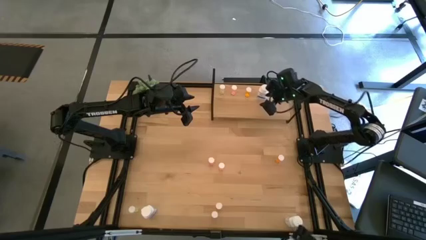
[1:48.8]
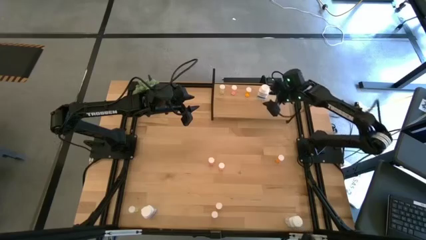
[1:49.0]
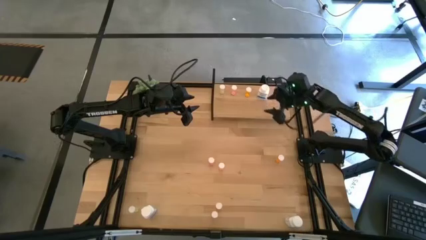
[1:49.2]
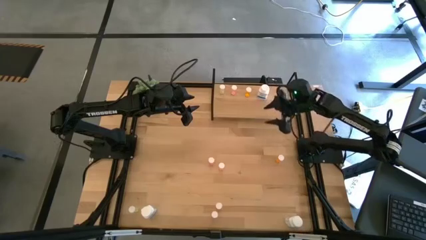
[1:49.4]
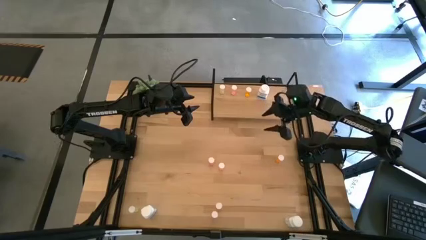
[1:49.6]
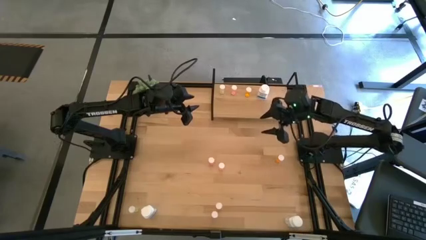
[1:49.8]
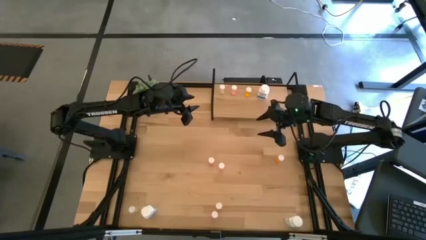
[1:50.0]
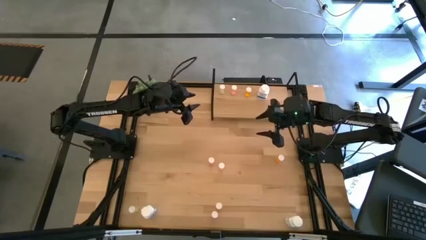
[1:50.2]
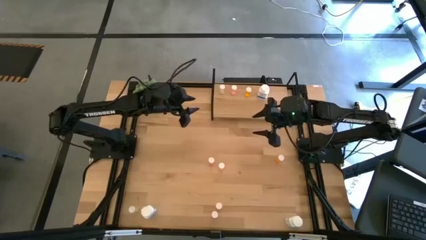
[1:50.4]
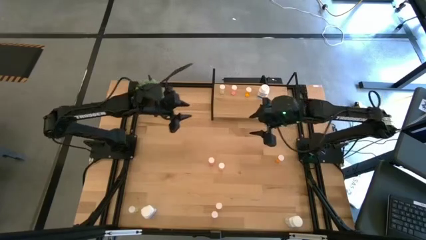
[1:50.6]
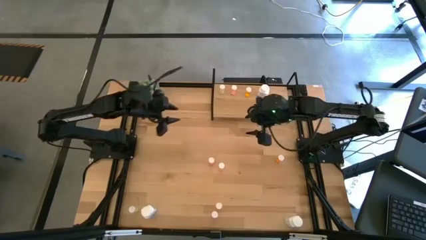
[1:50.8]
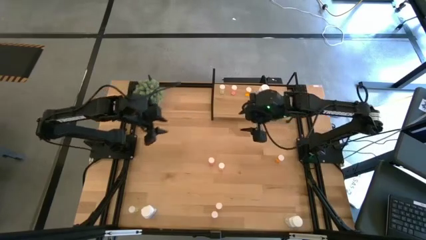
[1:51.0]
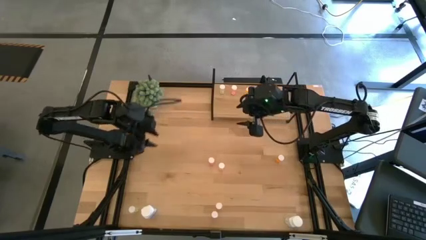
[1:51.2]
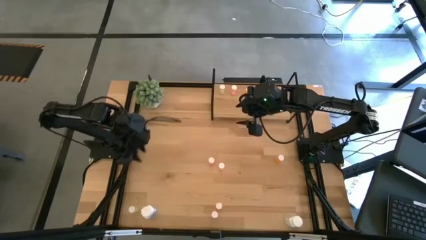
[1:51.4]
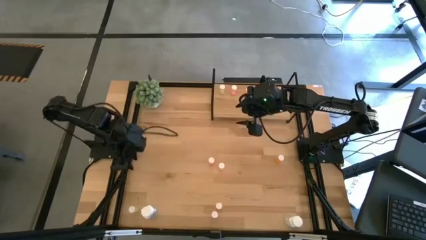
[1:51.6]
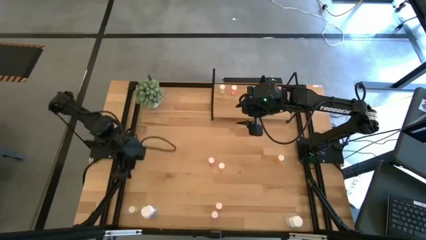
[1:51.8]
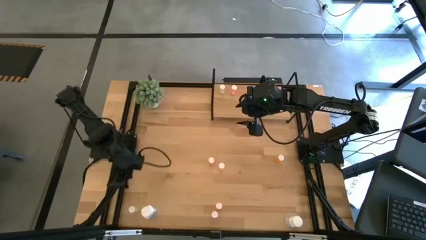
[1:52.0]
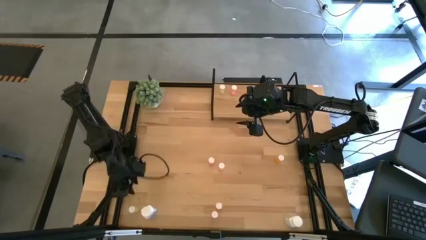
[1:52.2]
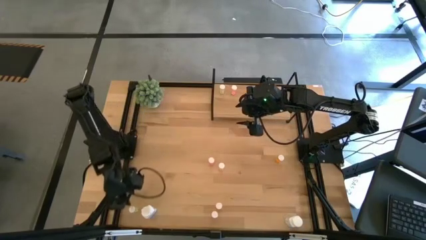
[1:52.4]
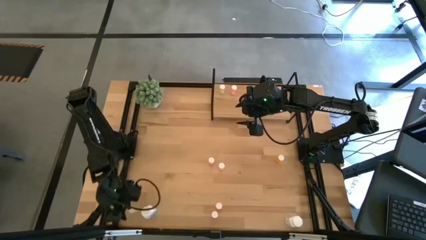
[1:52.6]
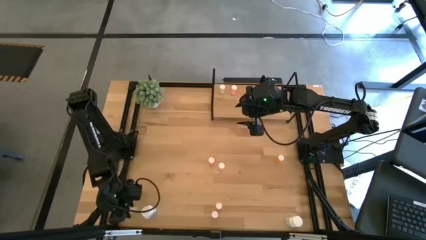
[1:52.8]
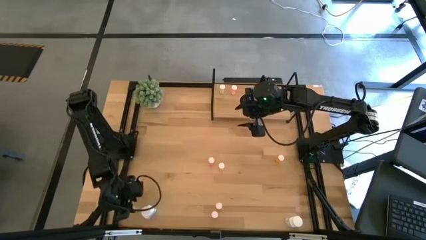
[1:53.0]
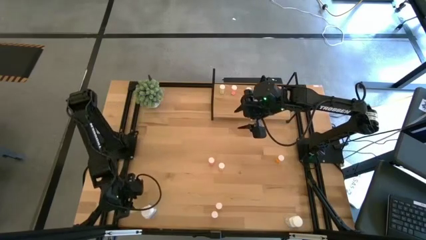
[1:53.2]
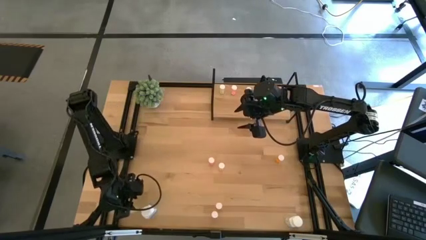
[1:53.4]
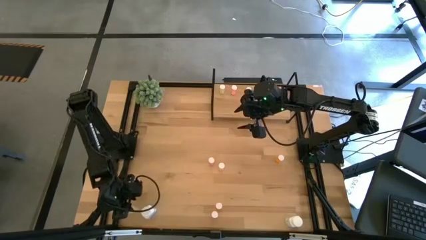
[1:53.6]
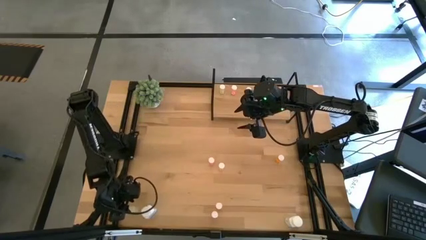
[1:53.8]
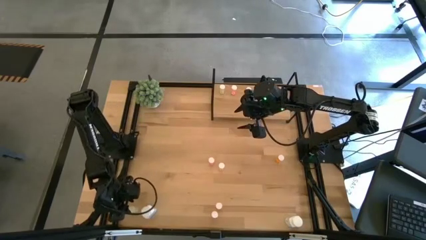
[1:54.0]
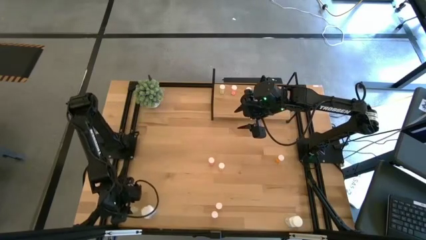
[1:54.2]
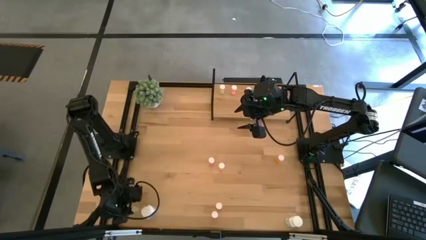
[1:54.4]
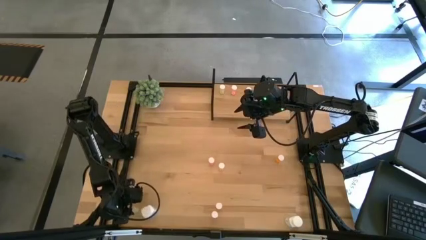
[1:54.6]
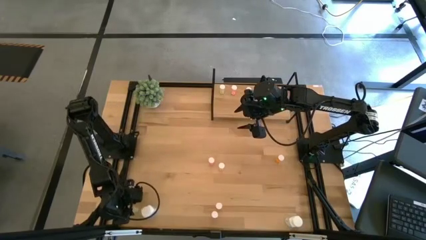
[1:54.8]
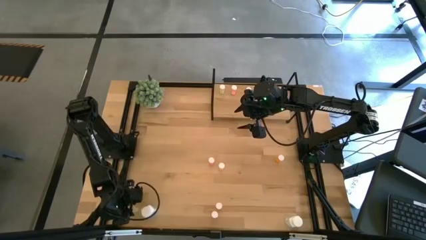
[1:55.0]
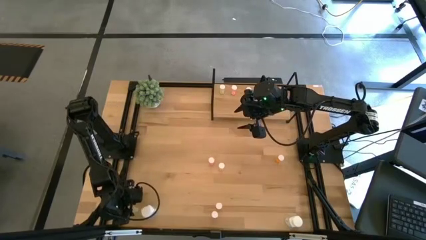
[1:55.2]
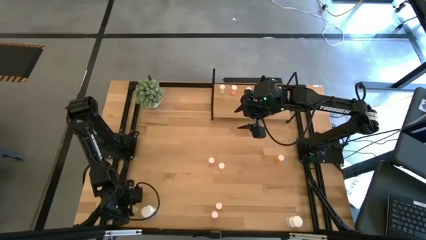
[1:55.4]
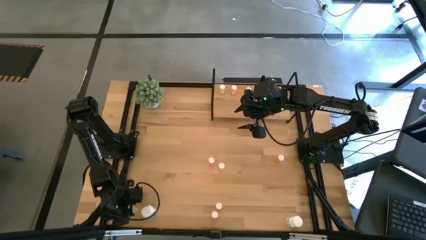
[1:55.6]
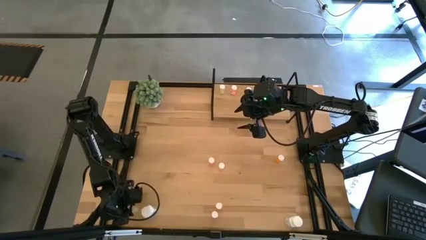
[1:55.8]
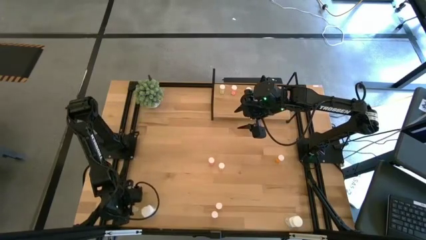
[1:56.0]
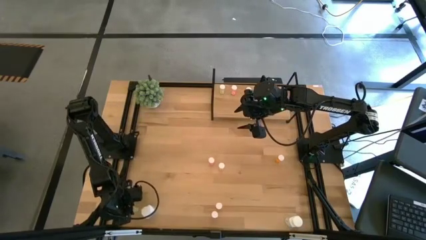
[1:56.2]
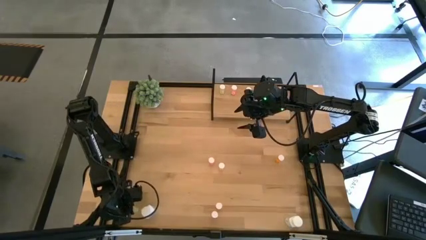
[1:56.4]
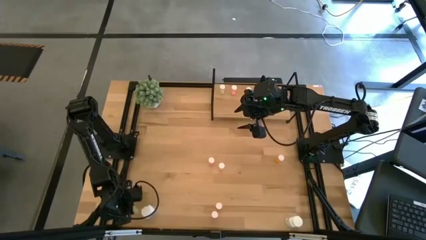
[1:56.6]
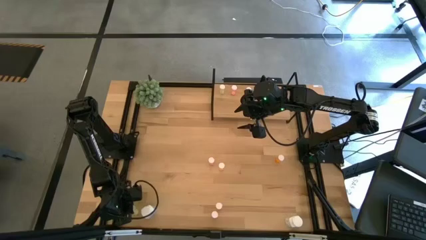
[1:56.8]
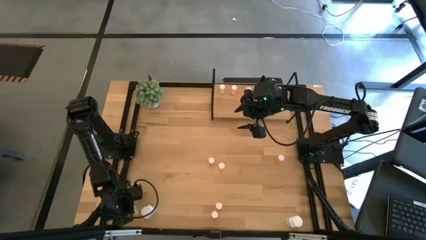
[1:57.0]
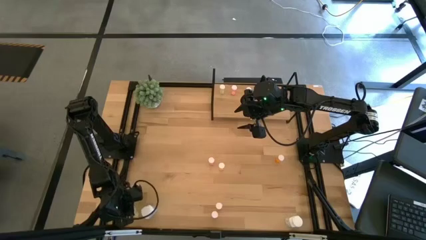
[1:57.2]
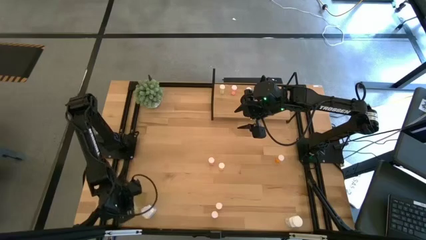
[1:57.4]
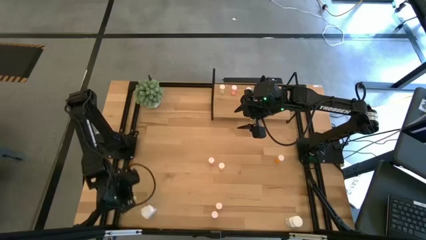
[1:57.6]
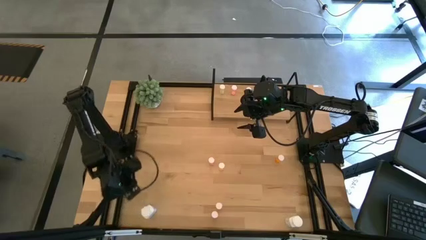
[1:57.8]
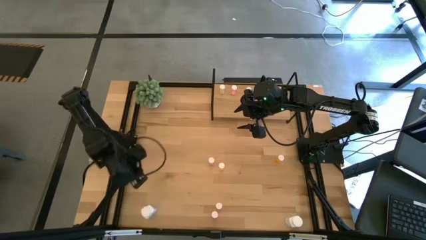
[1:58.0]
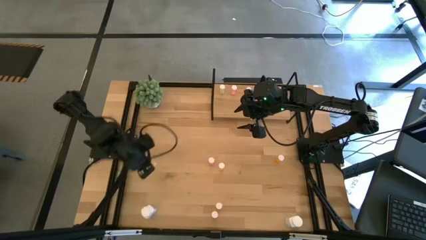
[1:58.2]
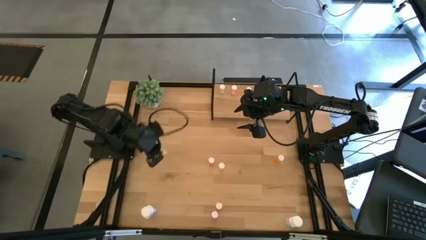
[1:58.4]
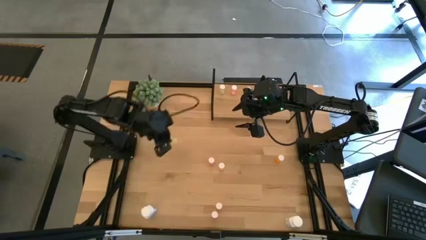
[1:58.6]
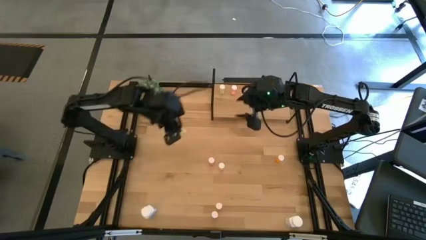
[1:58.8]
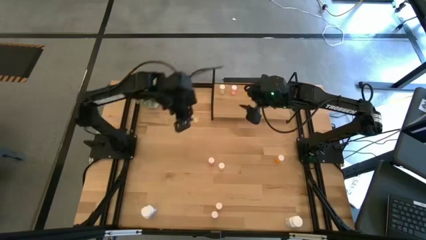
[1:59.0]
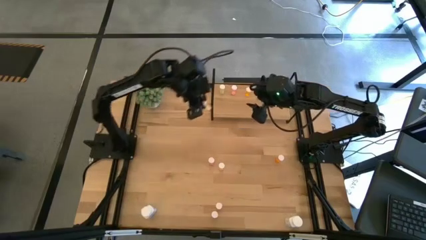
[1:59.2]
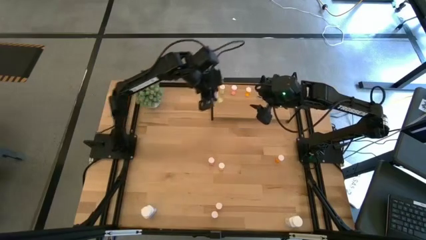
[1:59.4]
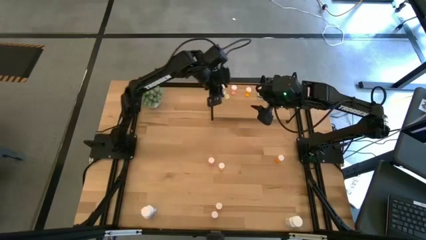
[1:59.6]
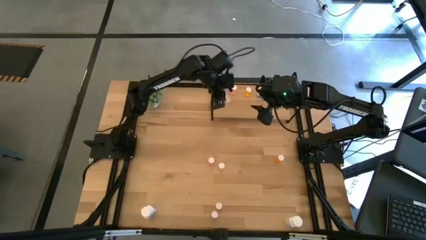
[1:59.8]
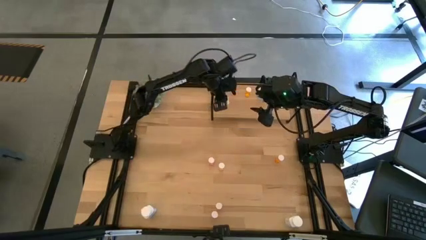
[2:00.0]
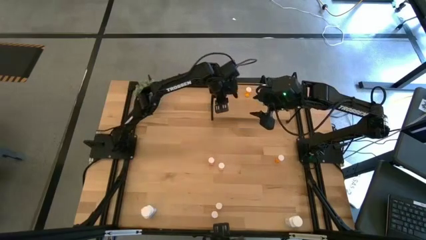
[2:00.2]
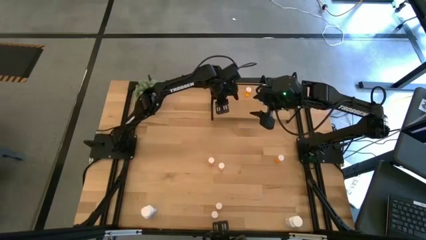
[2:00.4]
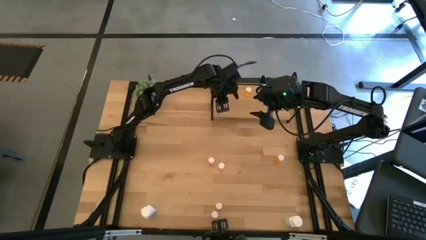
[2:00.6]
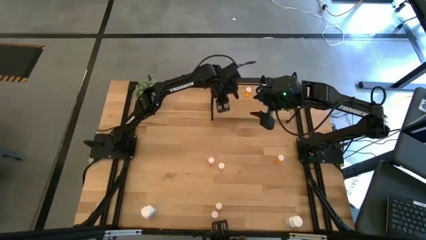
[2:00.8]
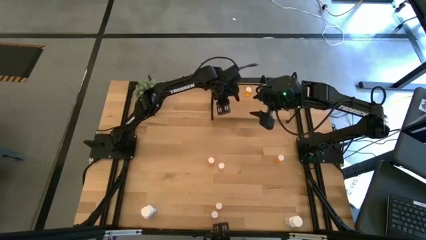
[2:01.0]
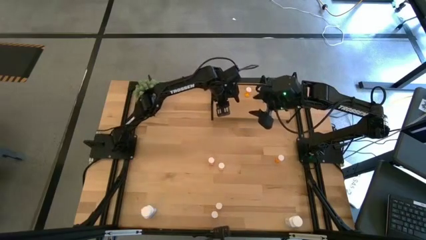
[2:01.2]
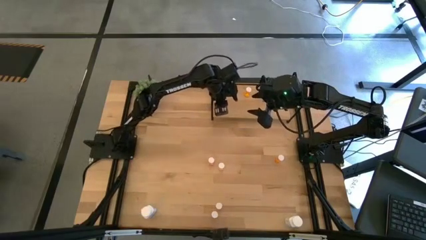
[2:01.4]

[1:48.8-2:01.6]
Task: Pick and place medicine bottles onto shelf by color
Put the left yellow pill bottle on the shelf aligned with the other yellow pill bottle

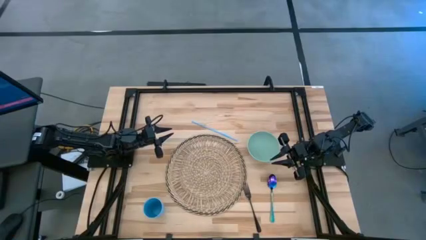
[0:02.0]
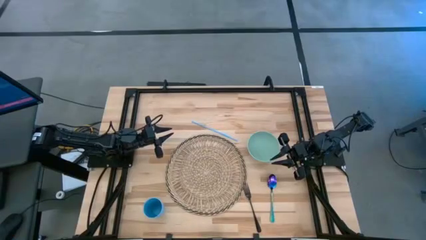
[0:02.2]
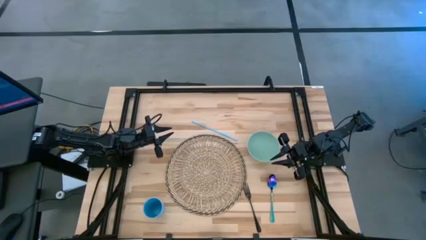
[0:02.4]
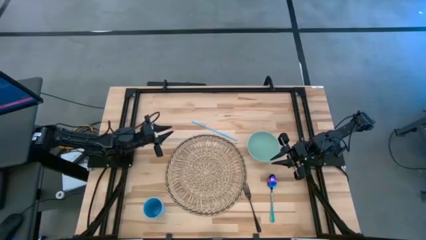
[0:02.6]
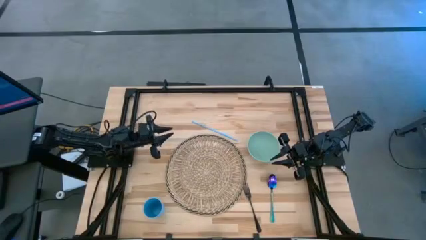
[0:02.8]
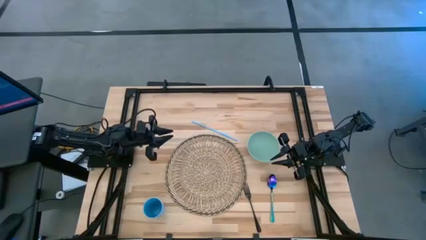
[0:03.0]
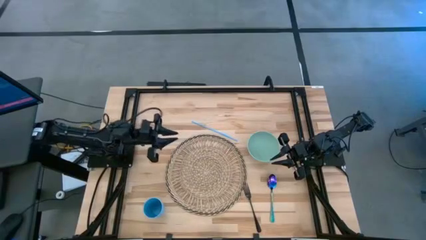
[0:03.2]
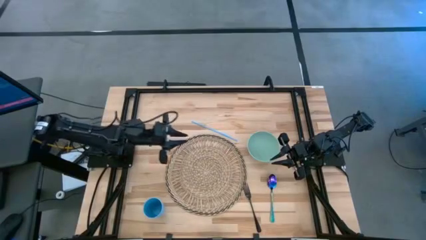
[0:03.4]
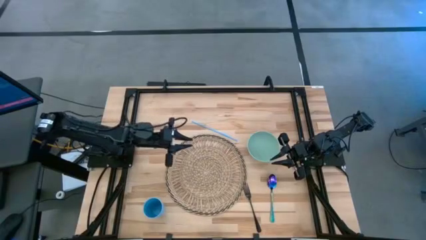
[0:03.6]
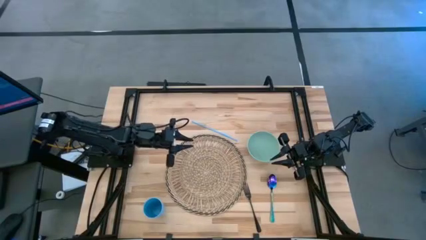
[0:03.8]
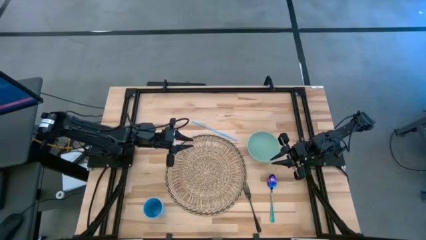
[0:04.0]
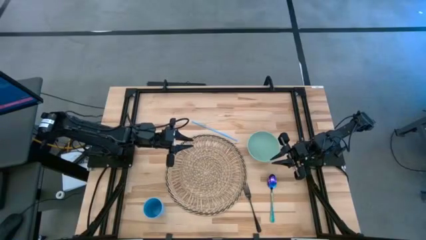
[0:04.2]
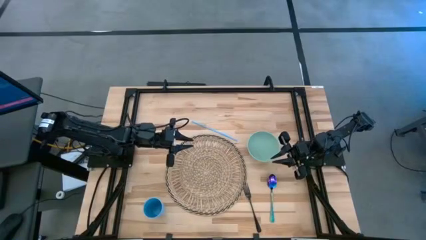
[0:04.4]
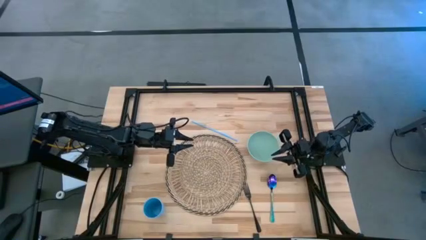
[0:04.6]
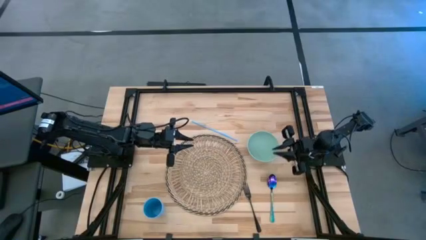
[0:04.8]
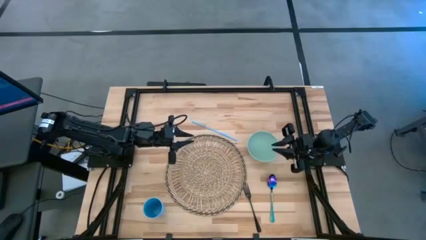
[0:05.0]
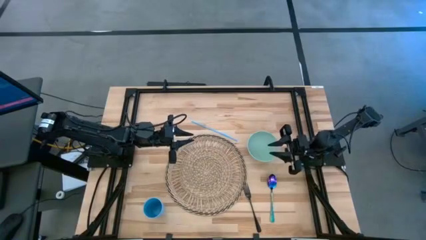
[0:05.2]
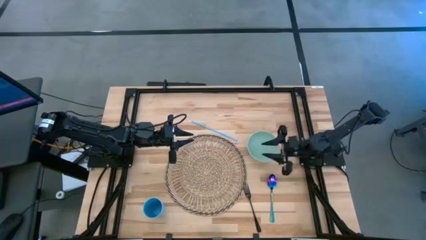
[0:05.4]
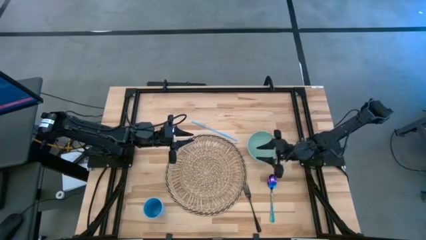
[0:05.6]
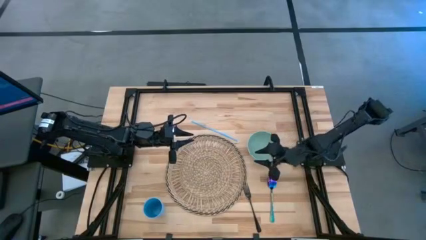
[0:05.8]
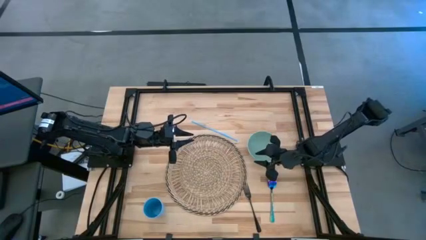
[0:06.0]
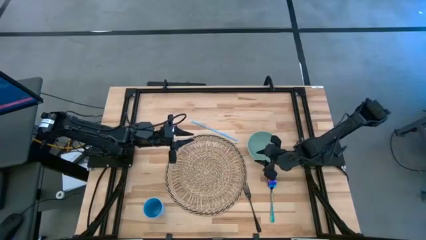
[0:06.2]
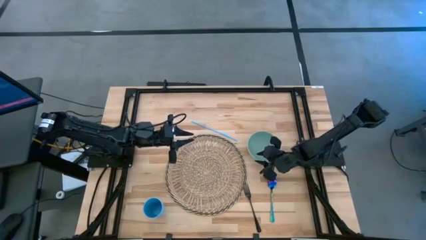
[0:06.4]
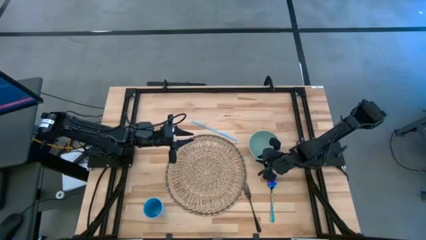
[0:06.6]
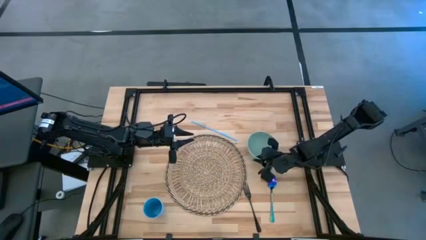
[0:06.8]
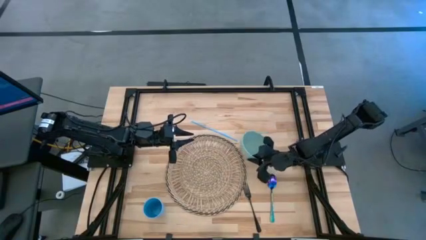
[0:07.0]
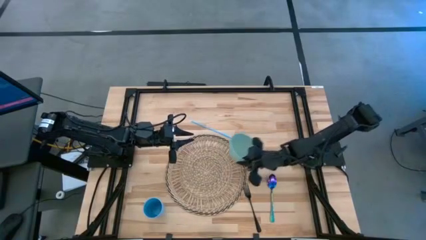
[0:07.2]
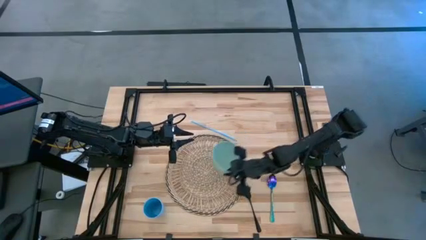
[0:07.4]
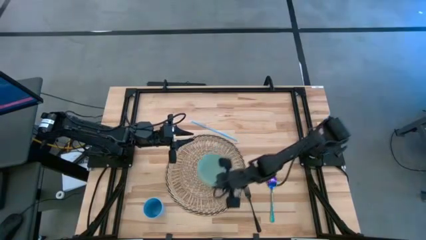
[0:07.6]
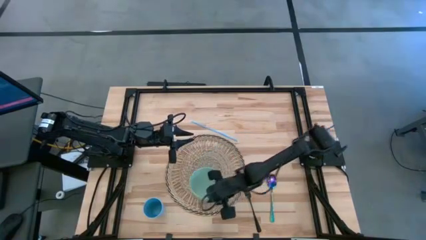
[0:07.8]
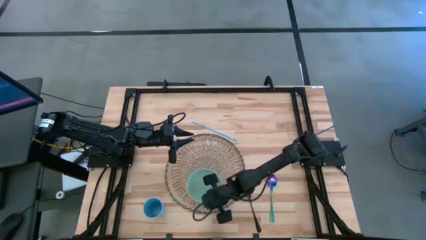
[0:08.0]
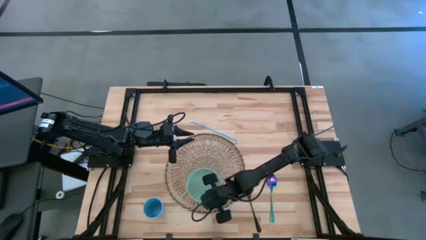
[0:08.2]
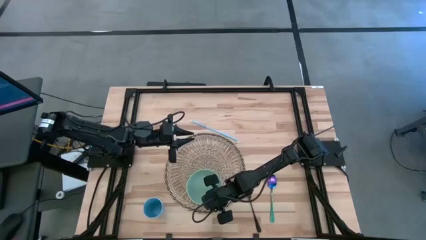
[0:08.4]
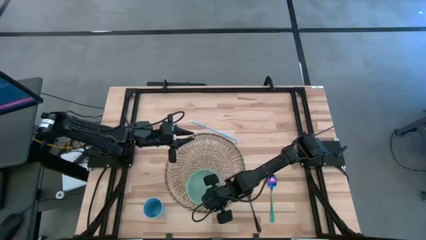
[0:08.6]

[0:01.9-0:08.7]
Task: Pick & Place Utensil
Put the green bowl on the brown mat
